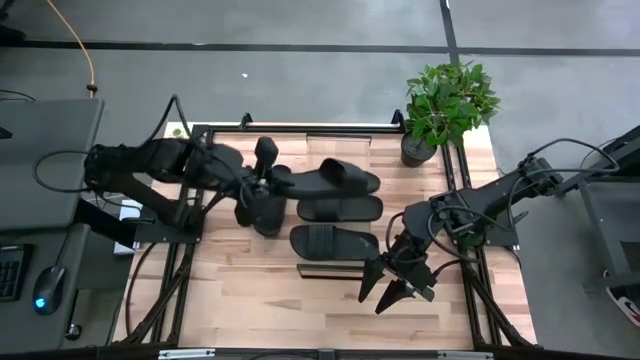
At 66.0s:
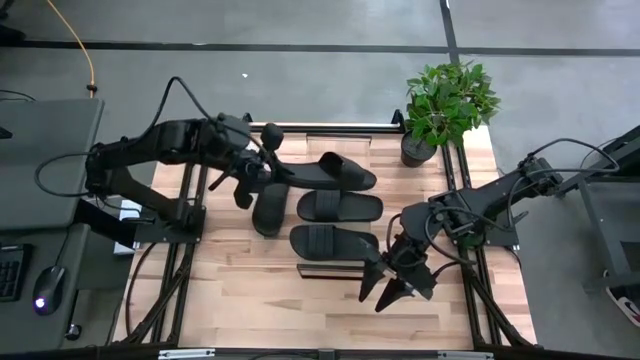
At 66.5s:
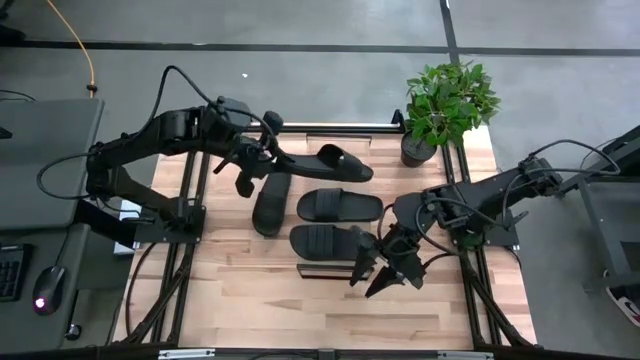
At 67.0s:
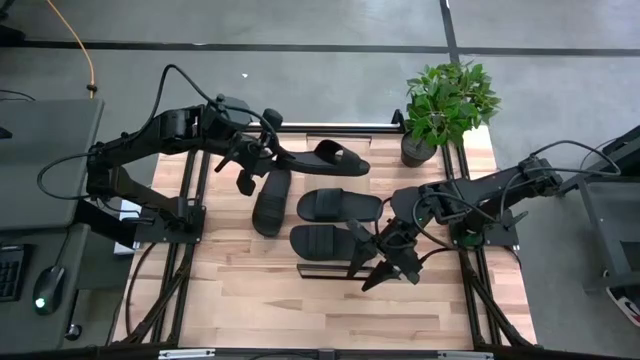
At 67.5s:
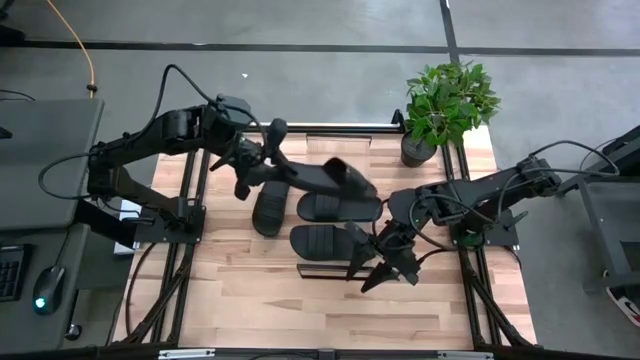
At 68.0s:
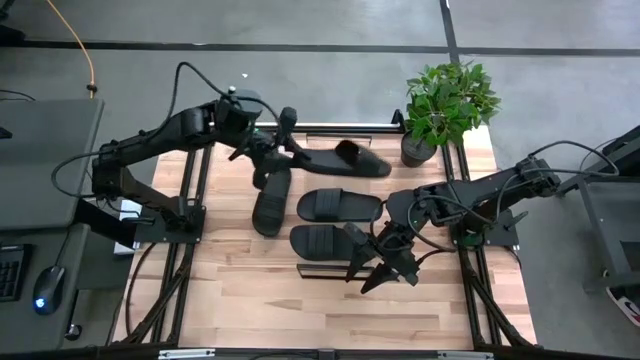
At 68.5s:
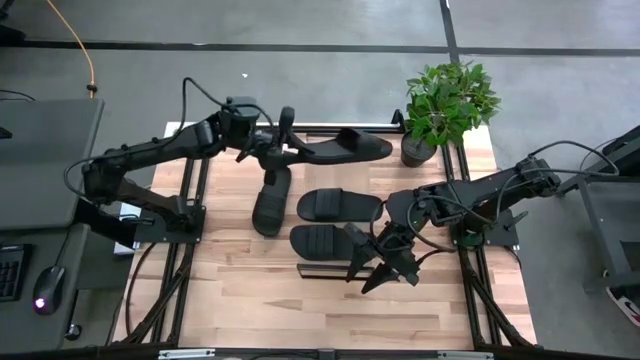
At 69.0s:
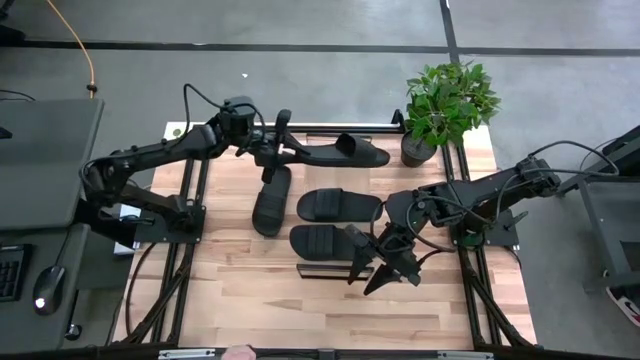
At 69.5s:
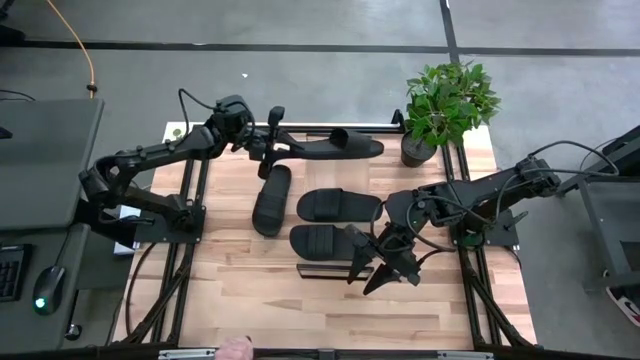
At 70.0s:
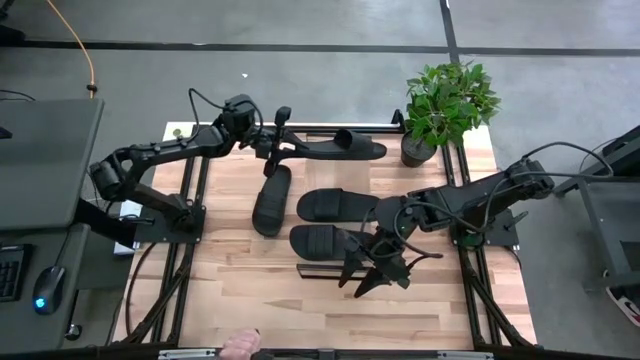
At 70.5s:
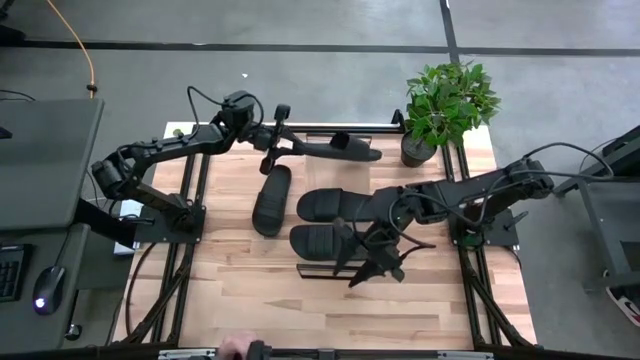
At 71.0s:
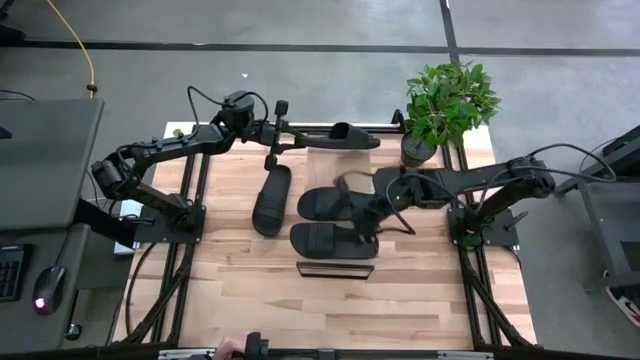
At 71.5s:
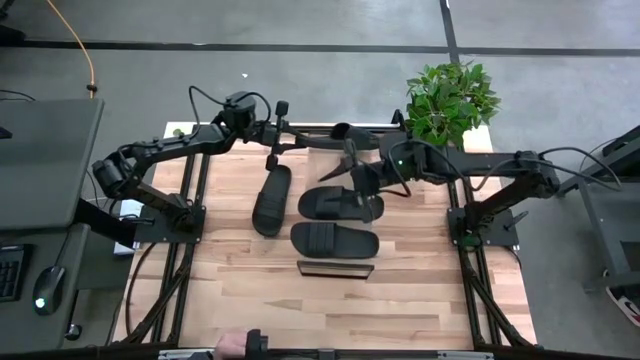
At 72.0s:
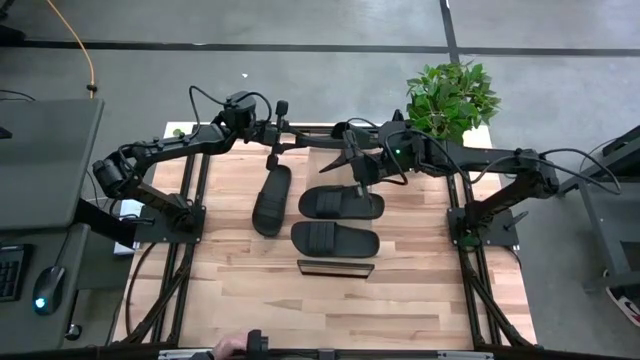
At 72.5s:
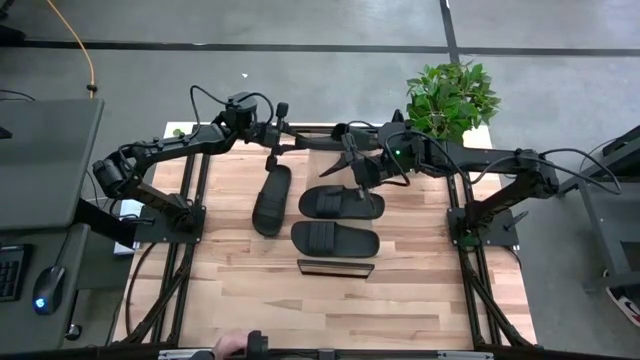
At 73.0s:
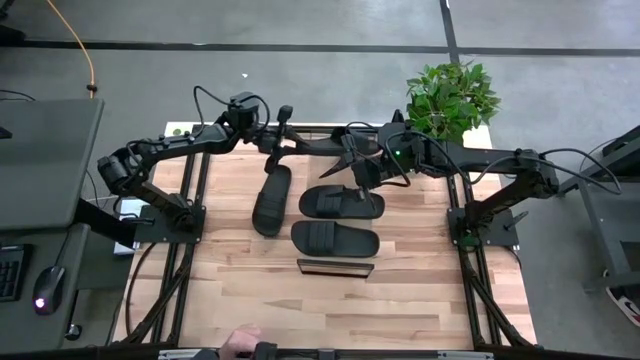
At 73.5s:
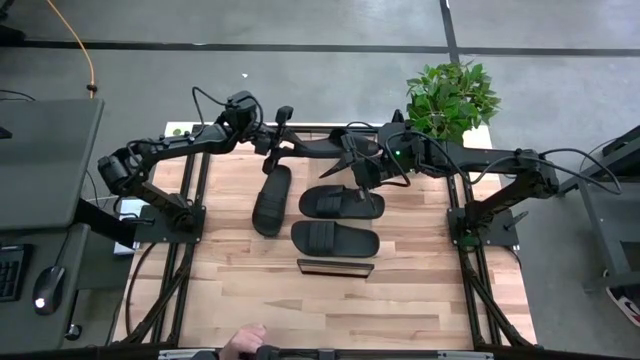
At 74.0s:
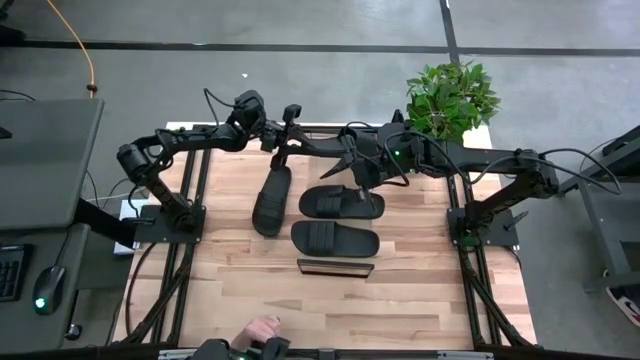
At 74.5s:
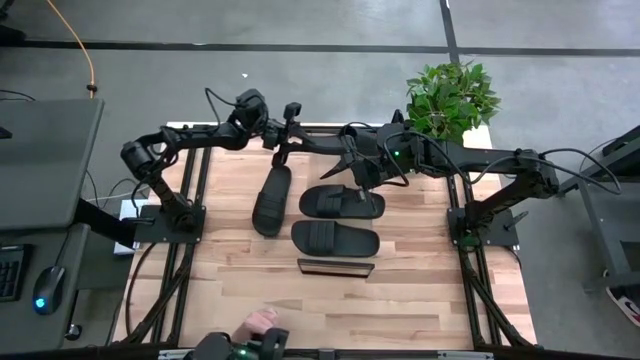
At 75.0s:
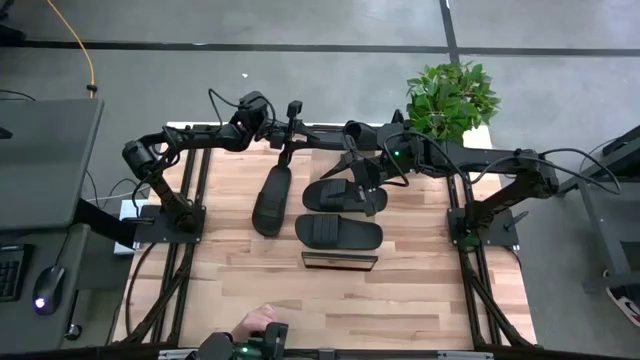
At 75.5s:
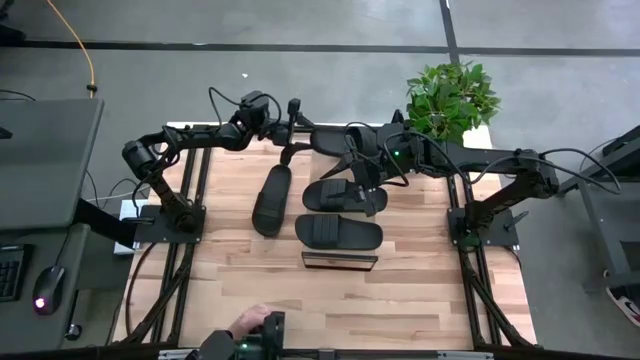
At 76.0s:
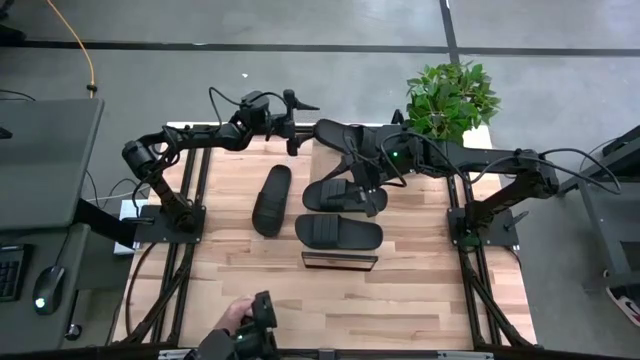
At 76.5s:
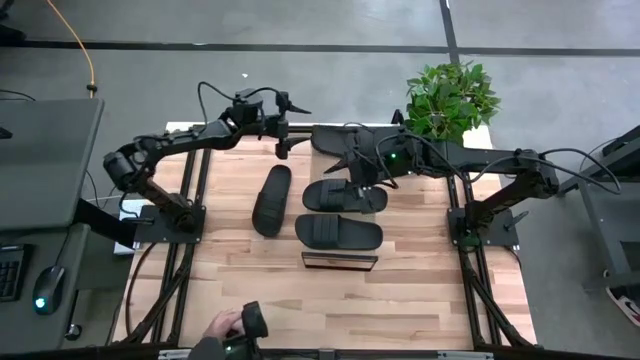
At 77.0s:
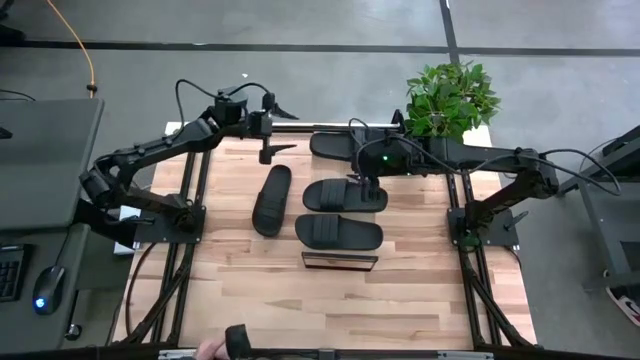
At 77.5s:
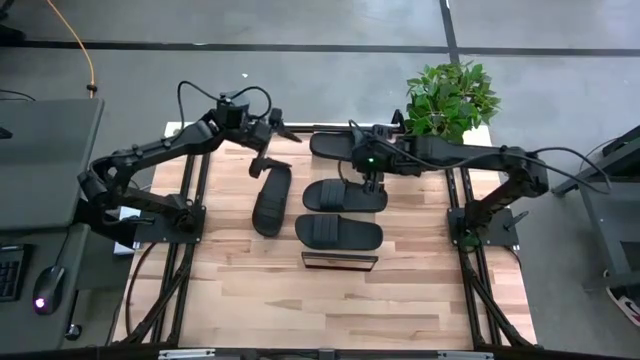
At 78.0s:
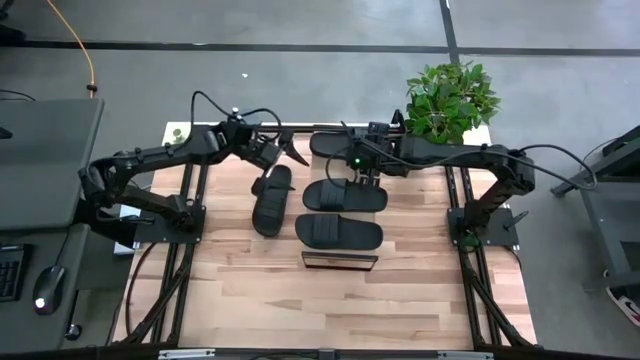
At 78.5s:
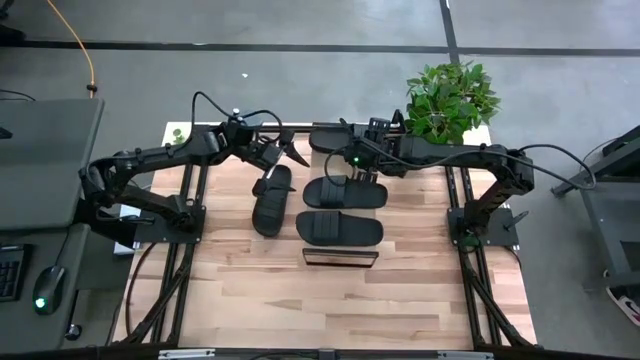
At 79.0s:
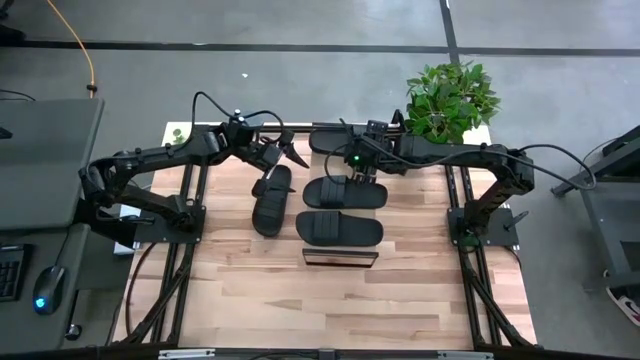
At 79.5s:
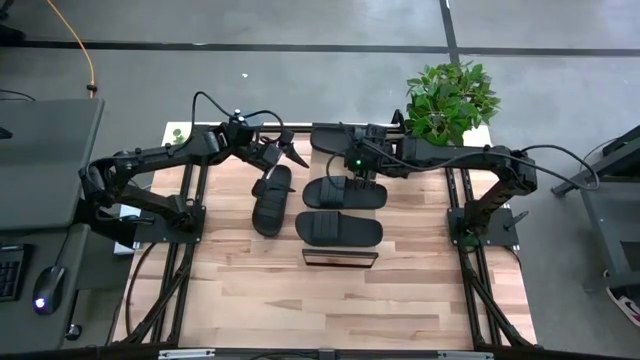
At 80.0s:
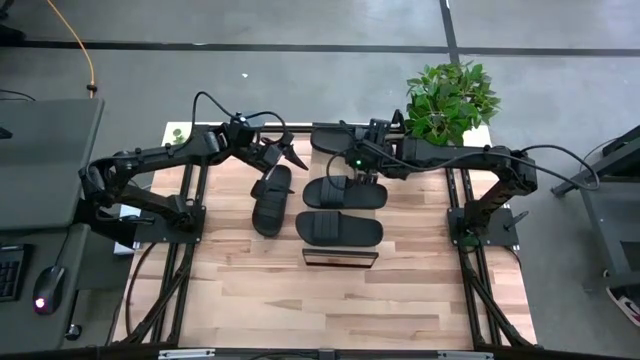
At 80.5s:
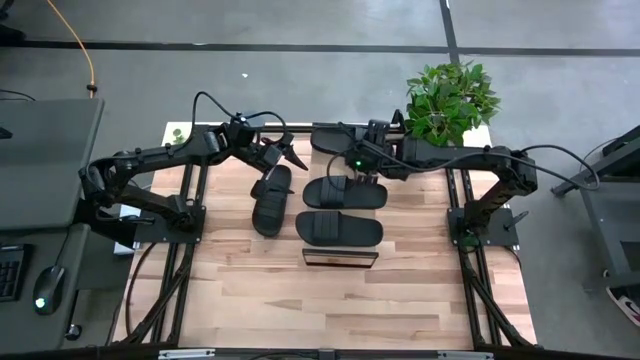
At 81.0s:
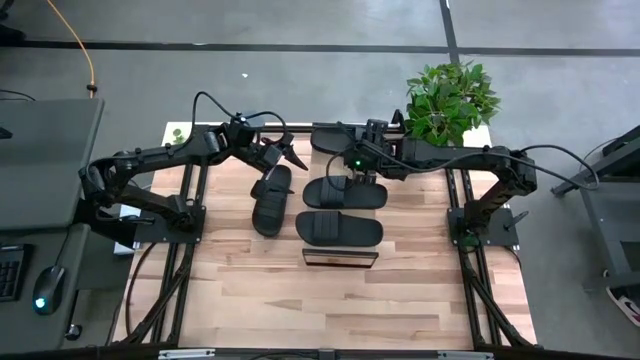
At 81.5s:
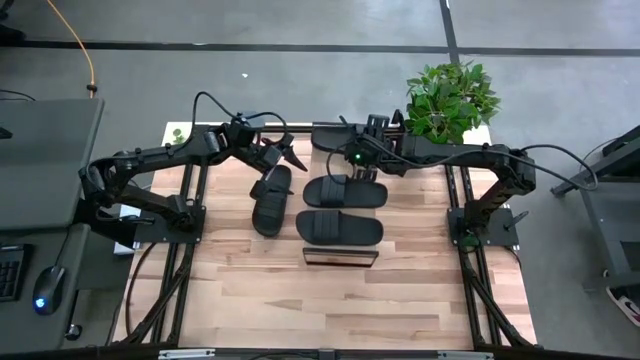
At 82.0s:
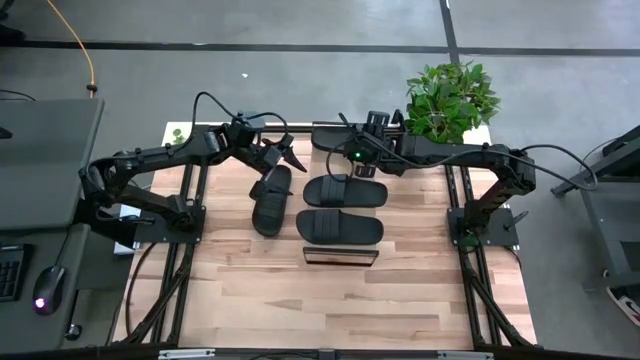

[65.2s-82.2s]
Task: Pick and place slides into the shelf
Put the bottom black slipper on the shelf

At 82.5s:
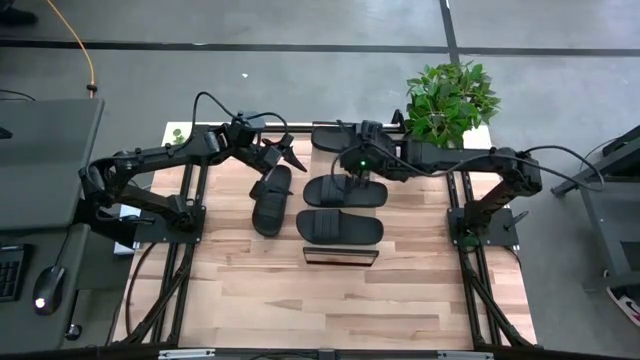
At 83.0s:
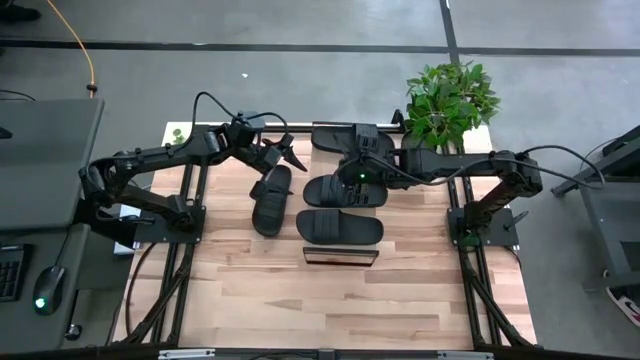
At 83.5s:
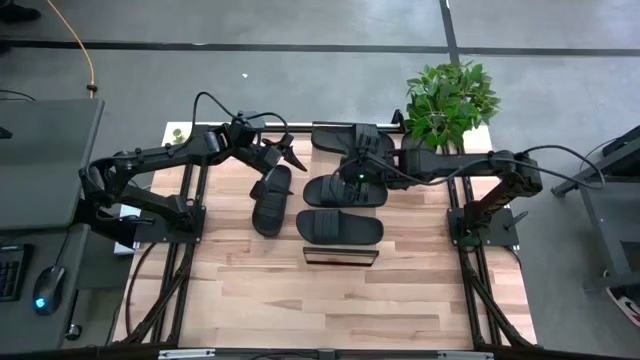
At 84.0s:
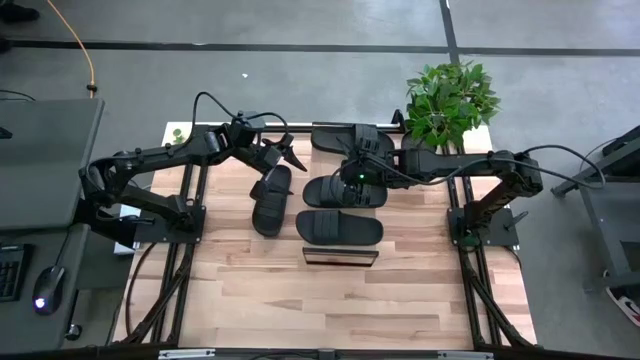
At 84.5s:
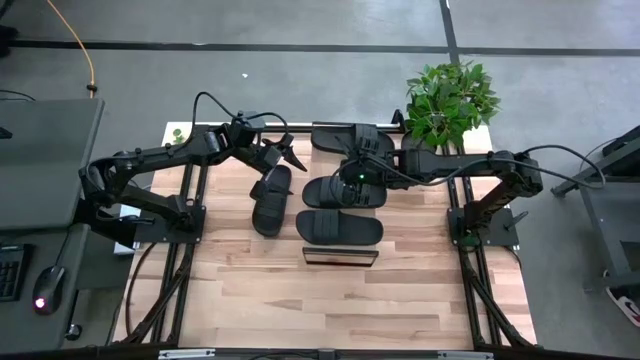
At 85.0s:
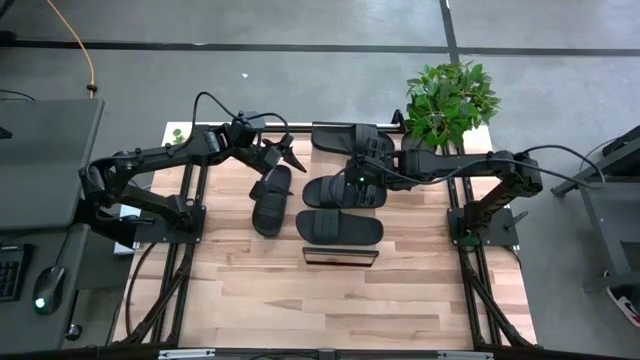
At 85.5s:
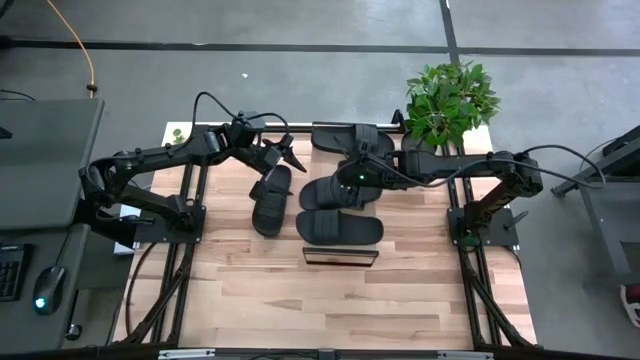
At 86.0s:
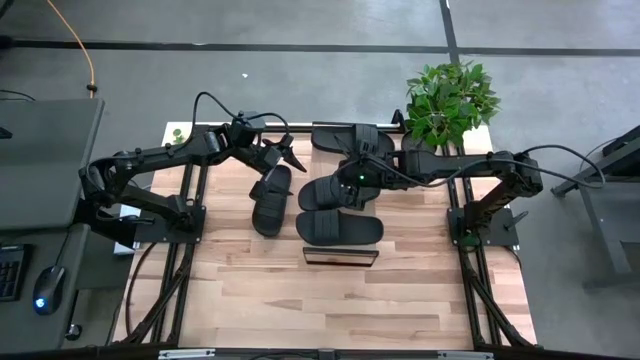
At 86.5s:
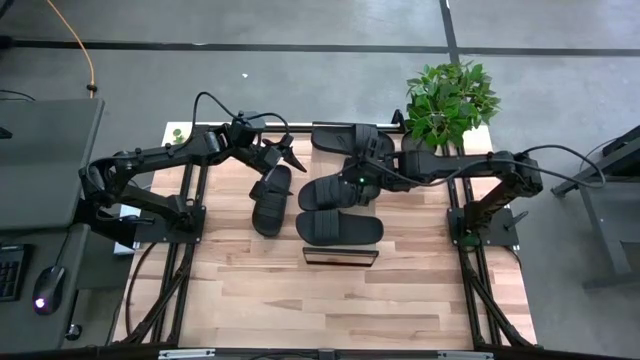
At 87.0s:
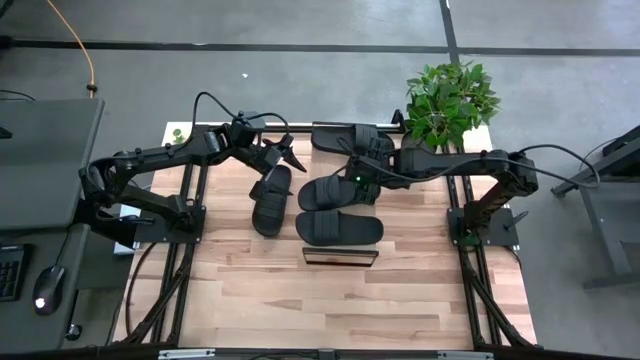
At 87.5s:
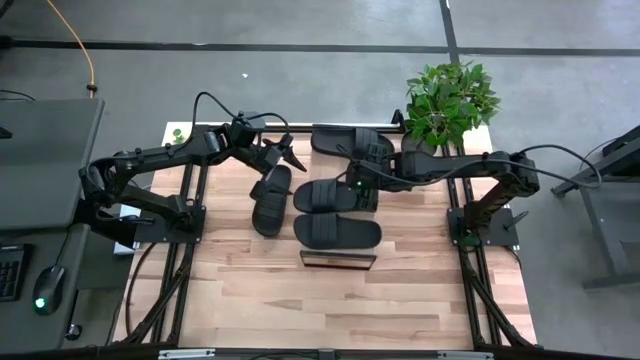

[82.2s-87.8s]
Adjust the middle black slipper on the shelf
